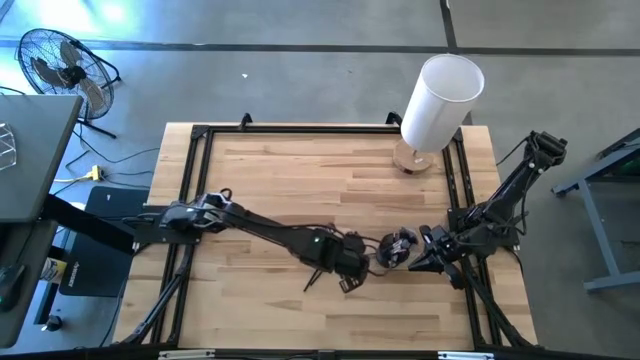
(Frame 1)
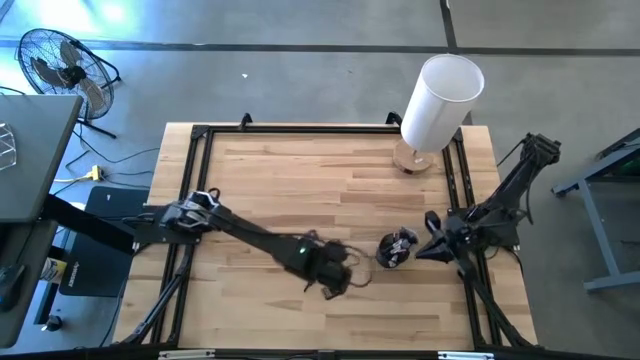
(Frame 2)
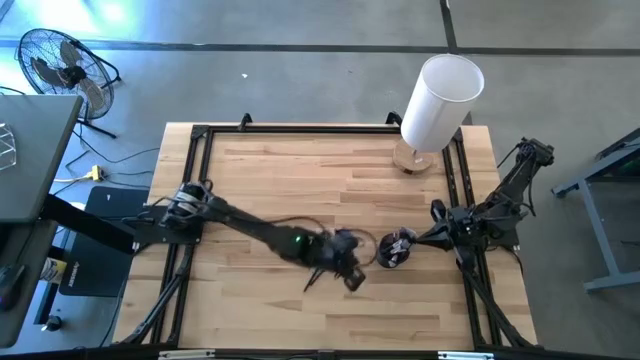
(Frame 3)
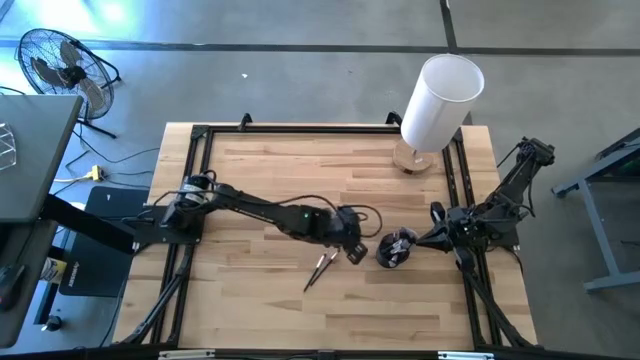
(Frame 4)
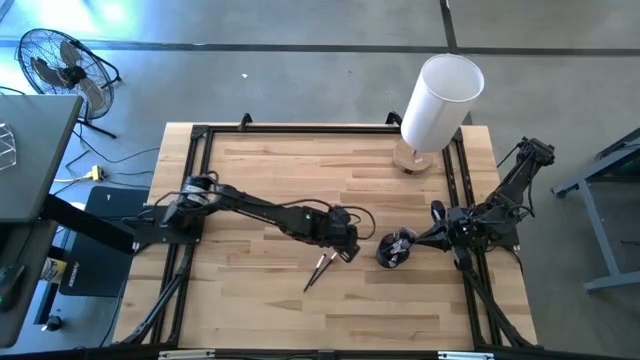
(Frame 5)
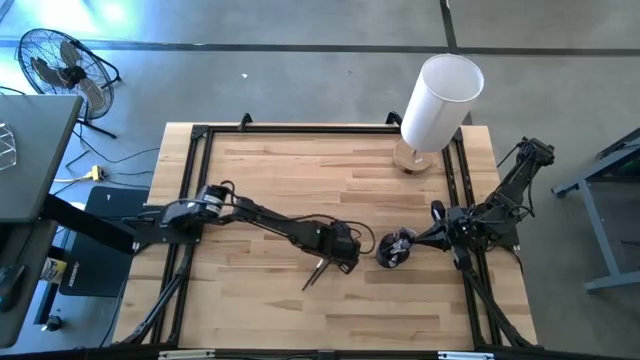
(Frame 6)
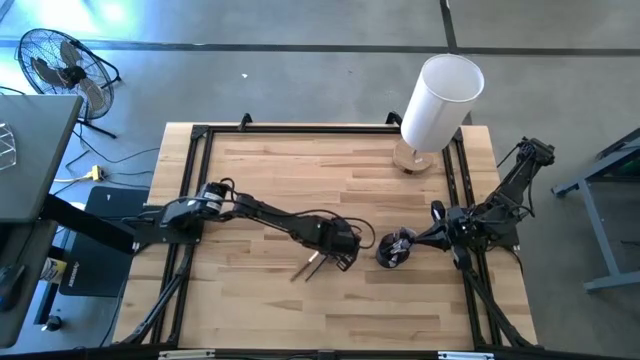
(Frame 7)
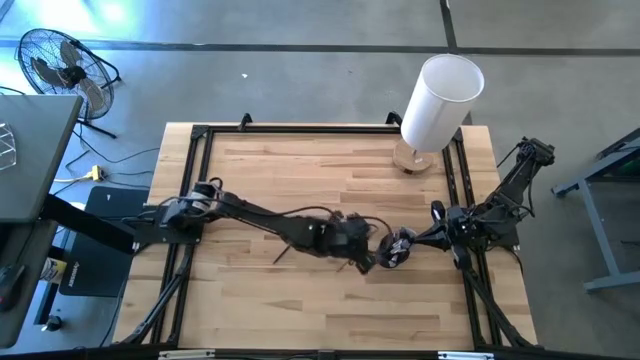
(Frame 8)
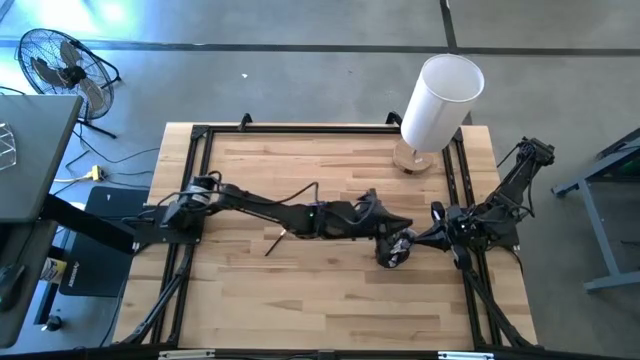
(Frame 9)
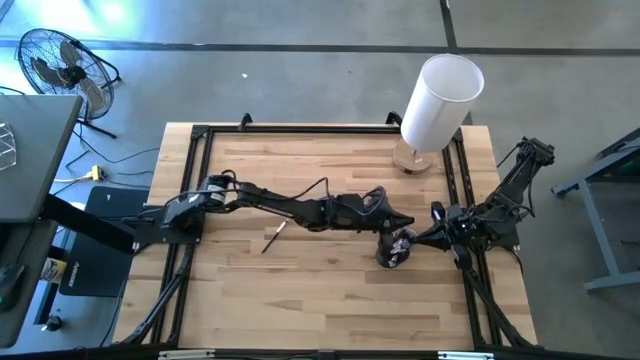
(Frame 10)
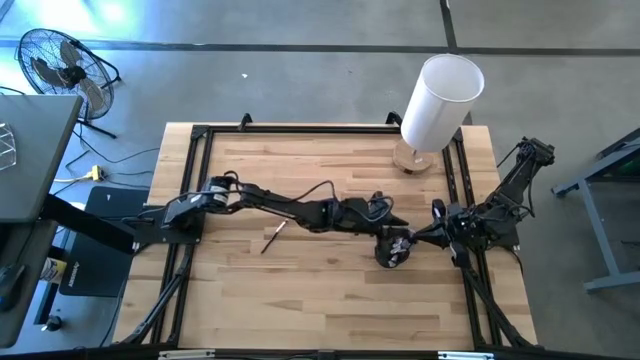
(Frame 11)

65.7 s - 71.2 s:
Task: Put items in baskets/containers
Put the lash into the mesh organizer

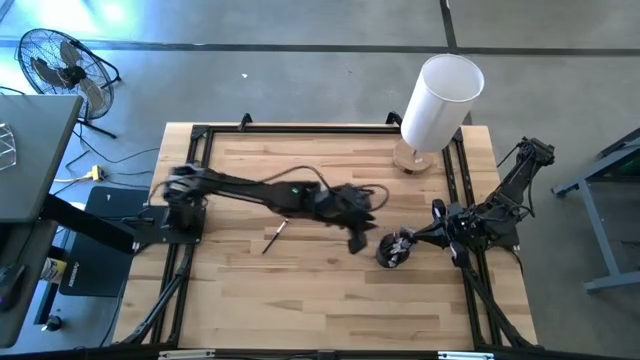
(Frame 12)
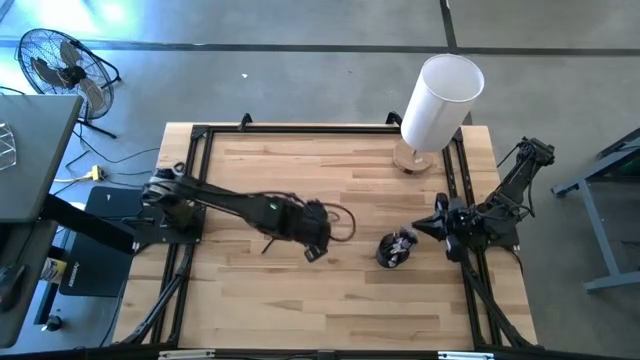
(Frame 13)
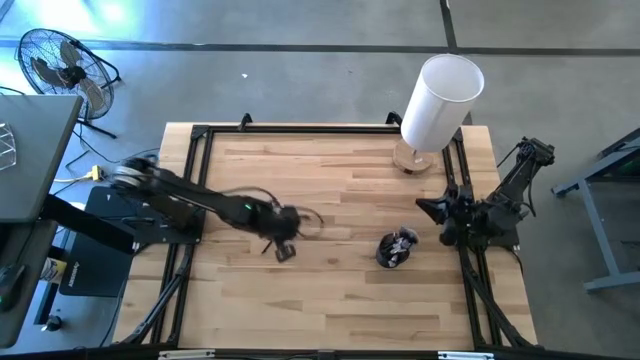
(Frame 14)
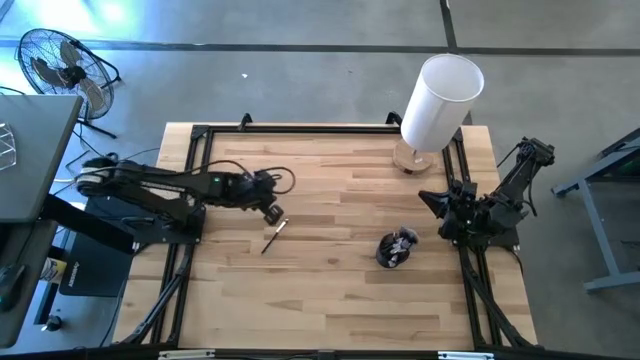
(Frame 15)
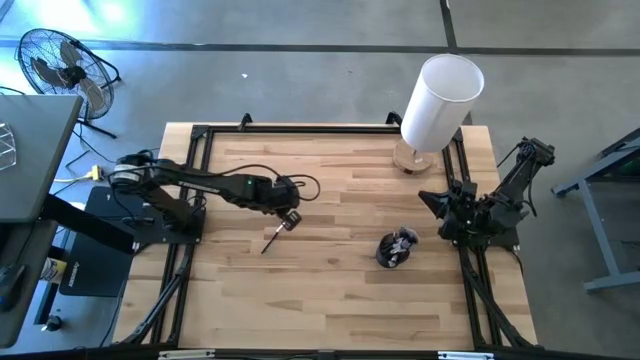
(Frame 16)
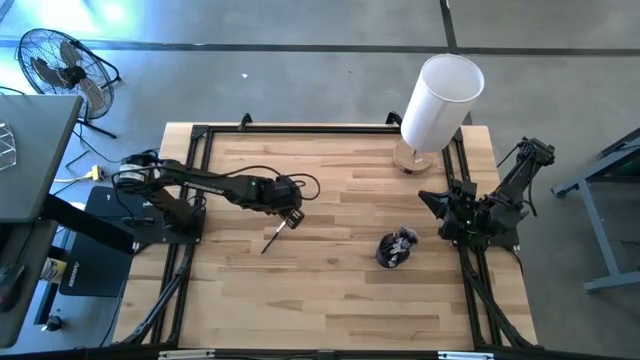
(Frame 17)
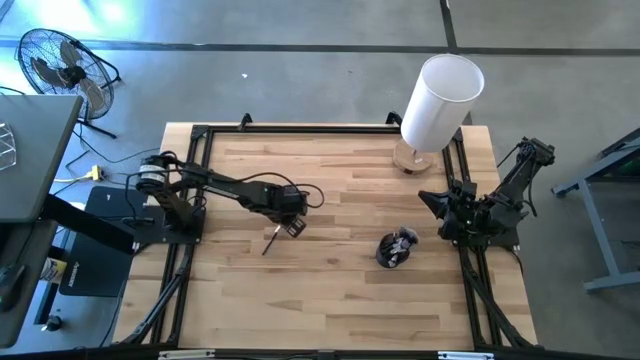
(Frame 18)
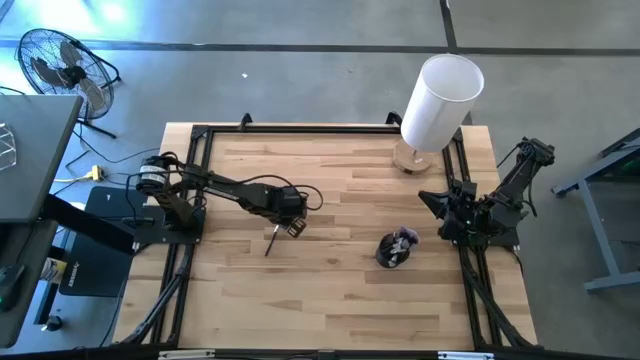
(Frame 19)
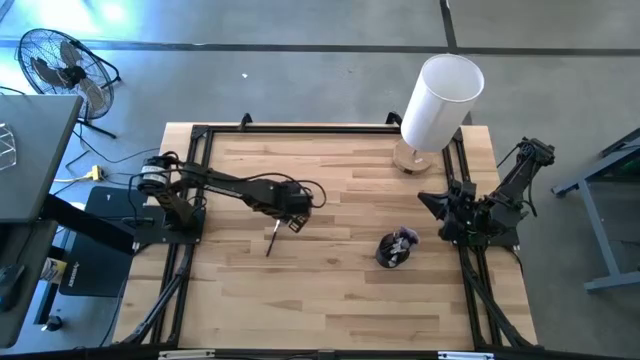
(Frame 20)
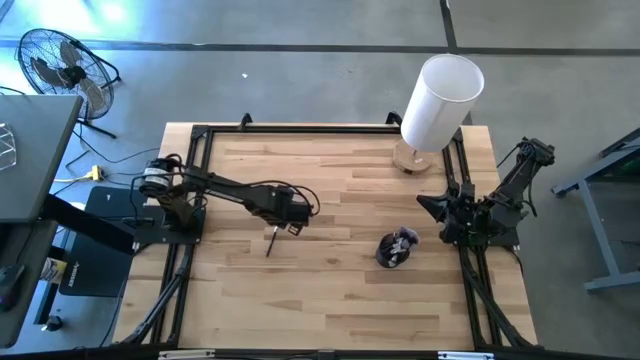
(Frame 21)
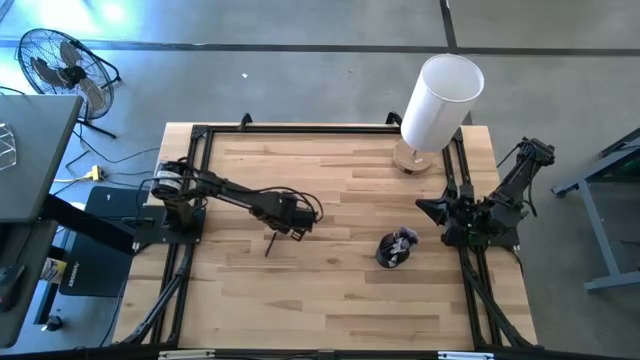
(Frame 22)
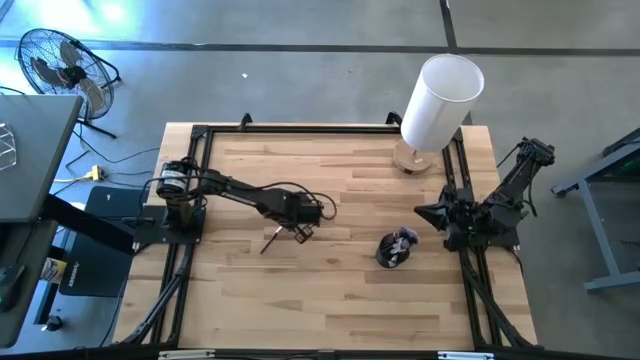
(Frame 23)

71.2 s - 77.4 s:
Put the eyeshadow brush into the mesh organizer

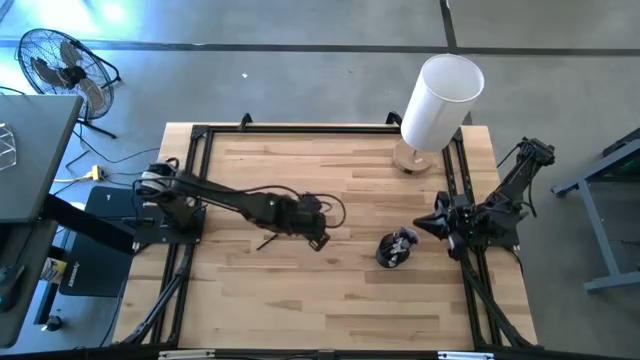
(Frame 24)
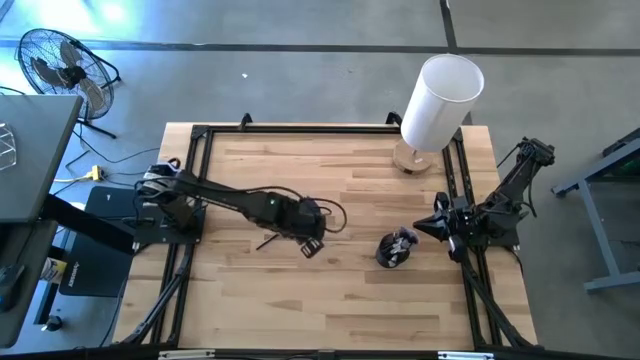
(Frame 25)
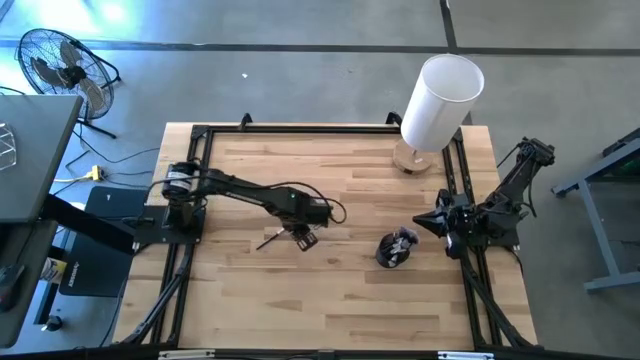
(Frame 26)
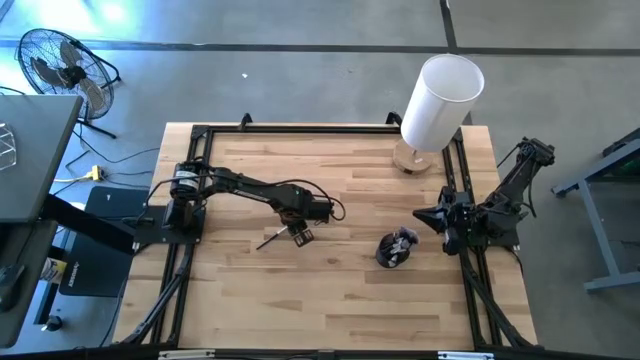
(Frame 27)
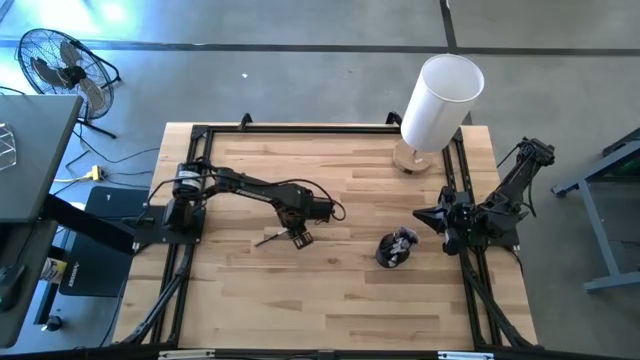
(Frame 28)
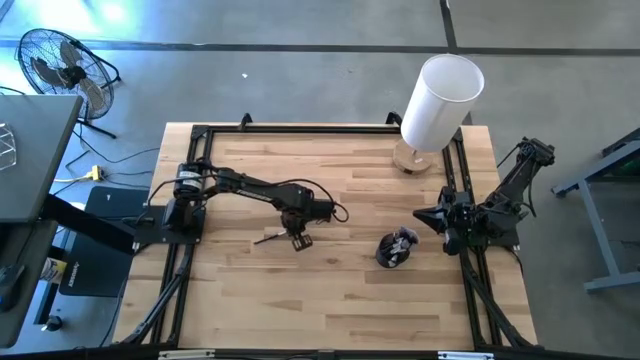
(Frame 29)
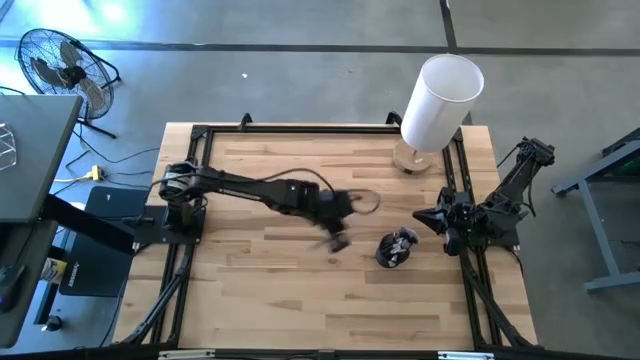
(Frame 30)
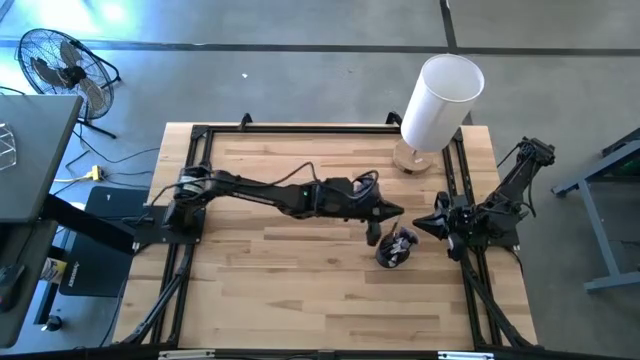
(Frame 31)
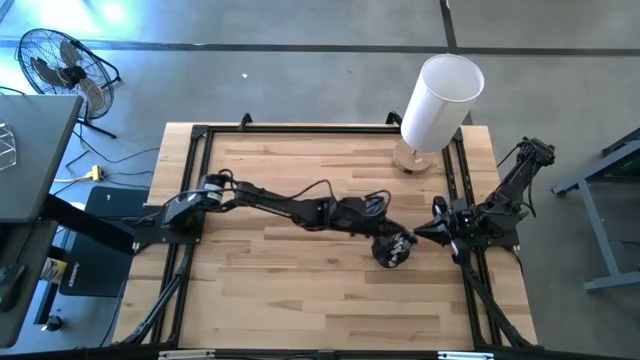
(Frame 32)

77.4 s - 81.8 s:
Put the eyeshadow brush into the mesh organizer

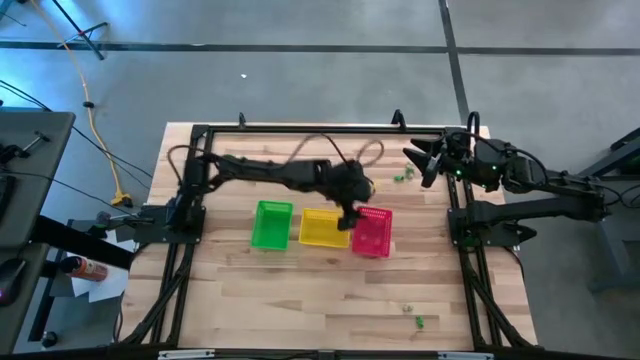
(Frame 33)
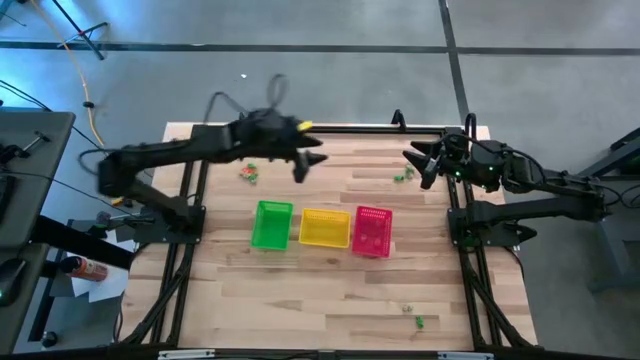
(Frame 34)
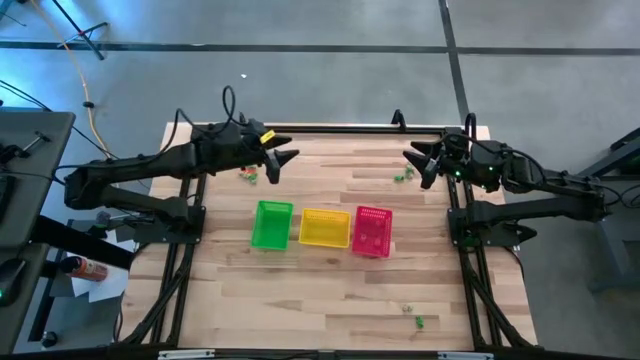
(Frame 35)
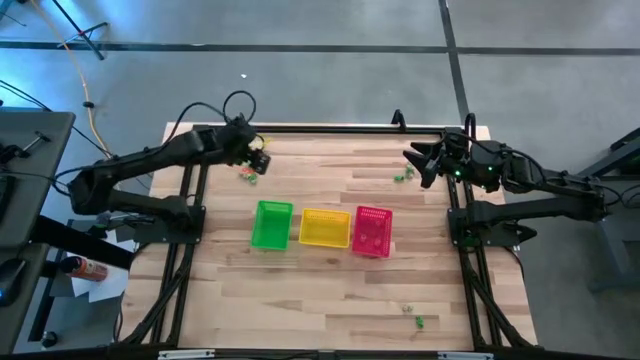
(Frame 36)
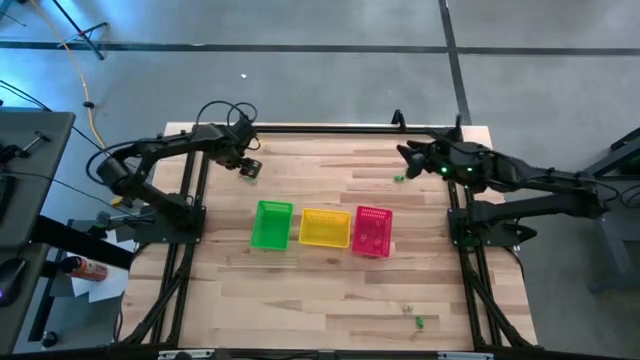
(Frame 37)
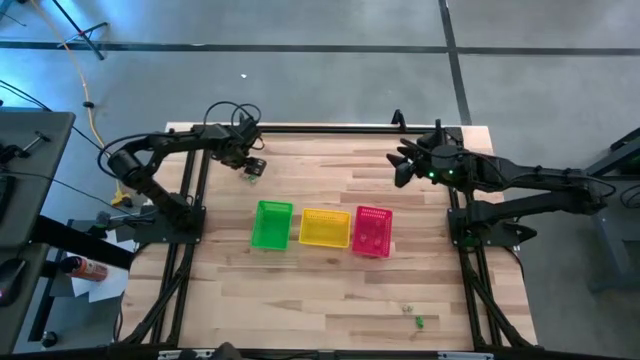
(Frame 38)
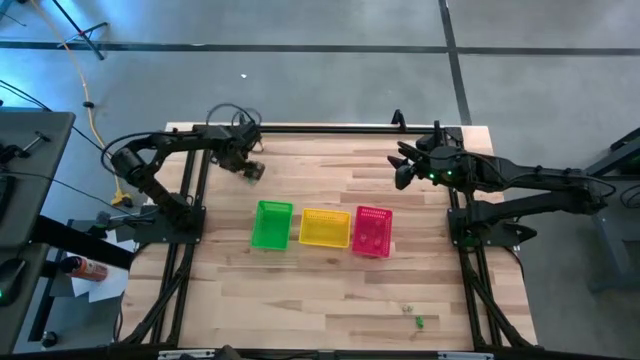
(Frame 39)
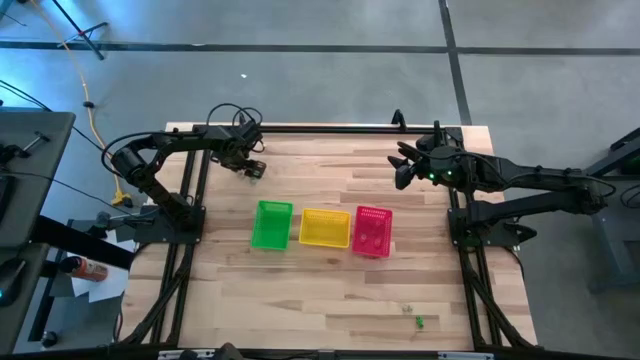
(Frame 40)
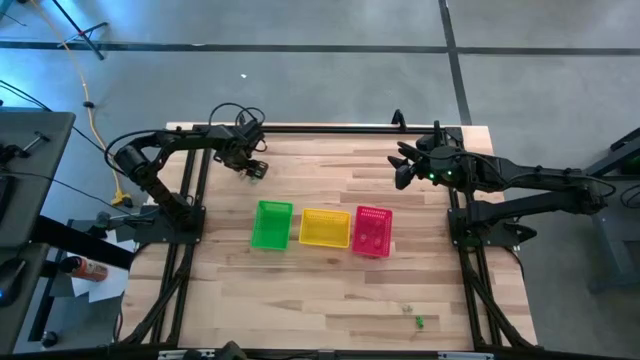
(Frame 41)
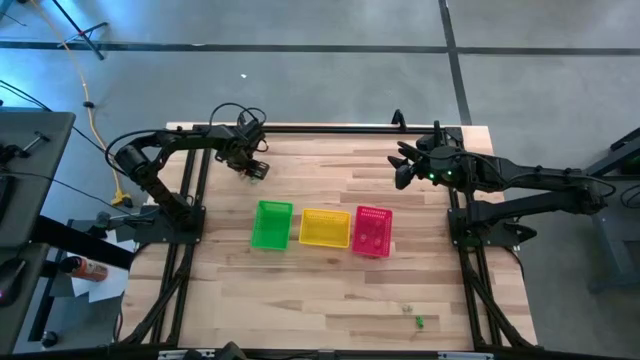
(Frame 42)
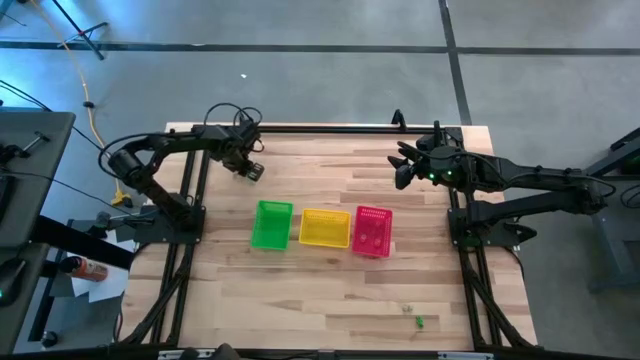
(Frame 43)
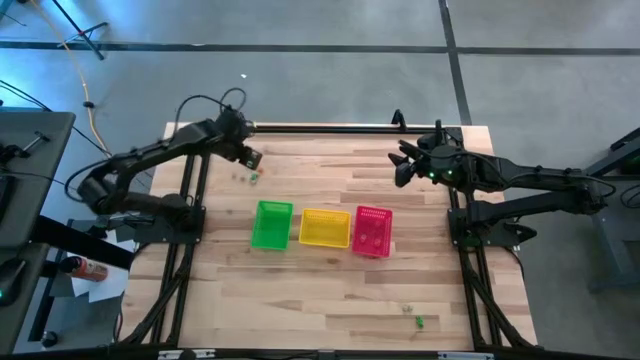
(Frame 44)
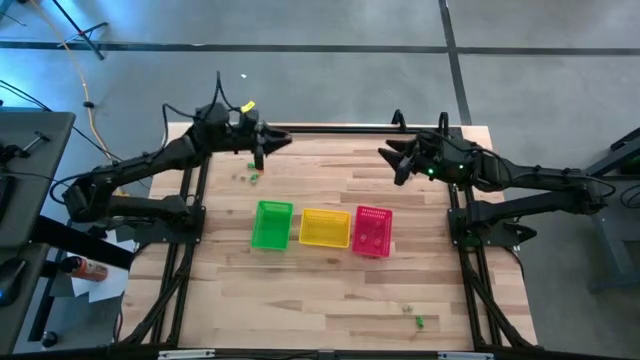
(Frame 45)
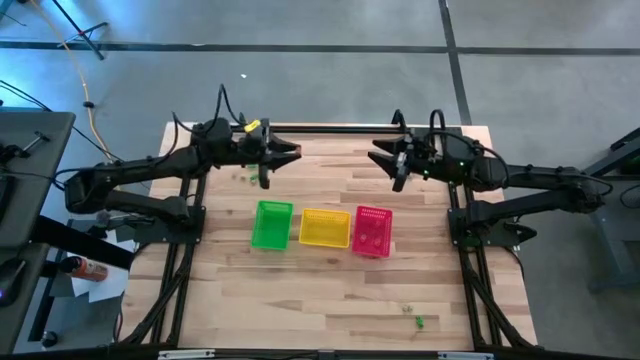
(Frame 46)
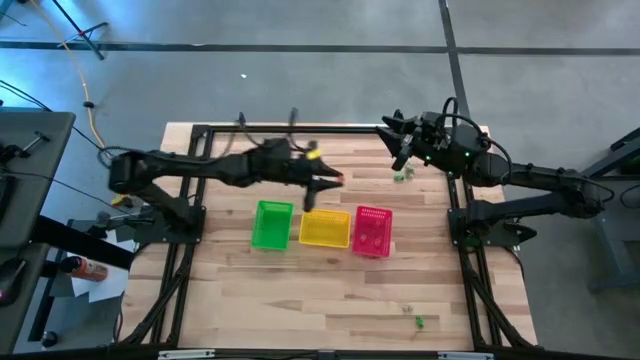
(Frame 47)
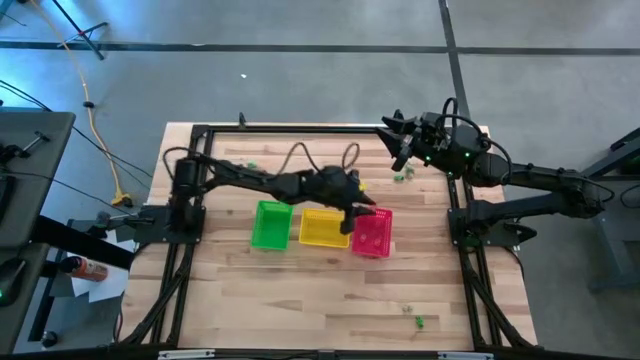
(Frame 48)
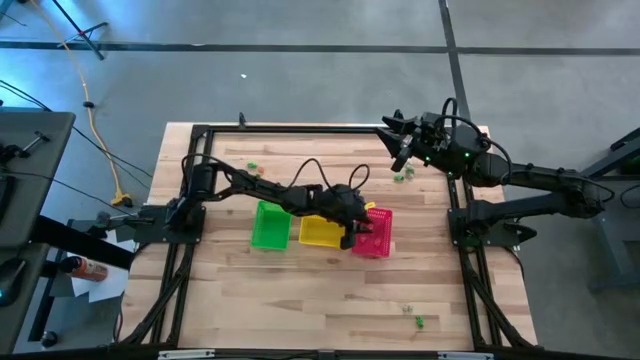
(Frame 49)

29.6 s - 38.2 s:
Task: Sort Halloween decoration
Put the orange pumpkin toy into the red basket
